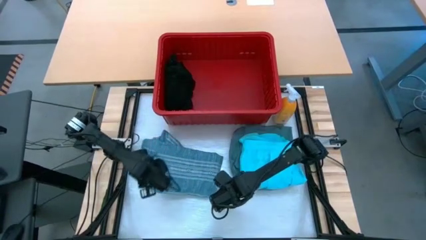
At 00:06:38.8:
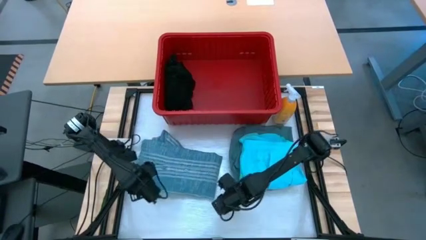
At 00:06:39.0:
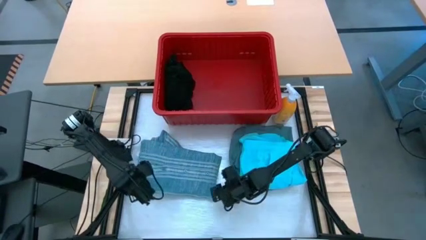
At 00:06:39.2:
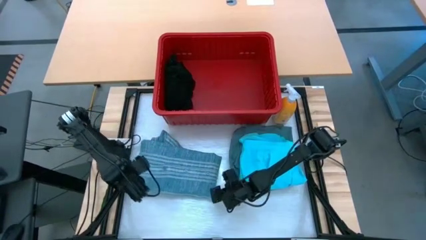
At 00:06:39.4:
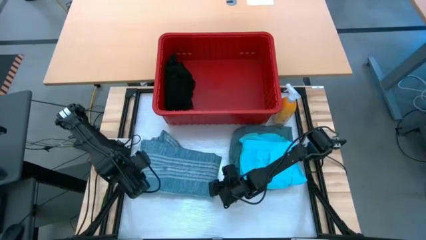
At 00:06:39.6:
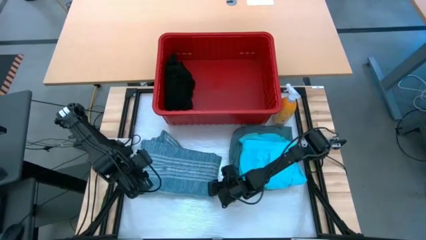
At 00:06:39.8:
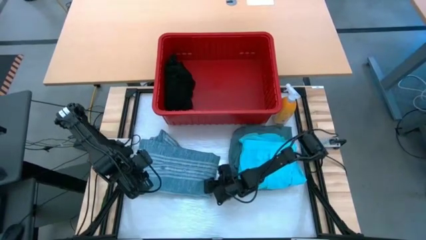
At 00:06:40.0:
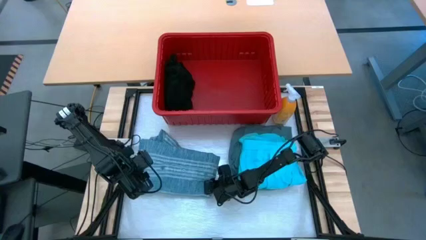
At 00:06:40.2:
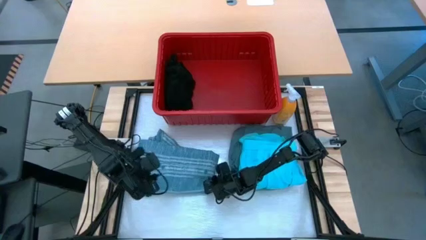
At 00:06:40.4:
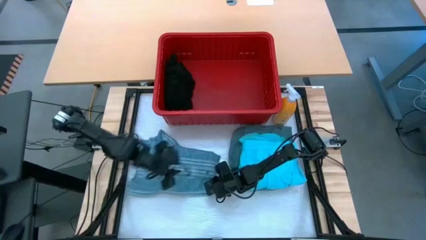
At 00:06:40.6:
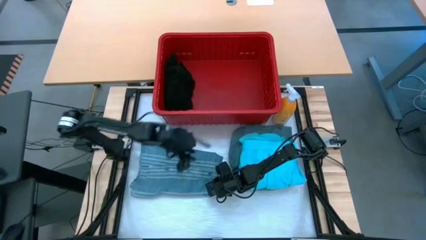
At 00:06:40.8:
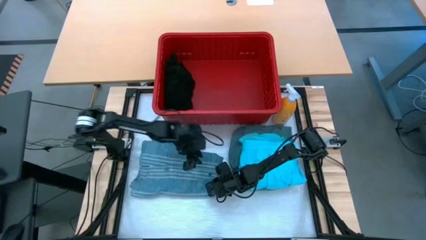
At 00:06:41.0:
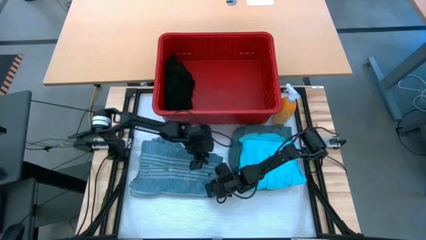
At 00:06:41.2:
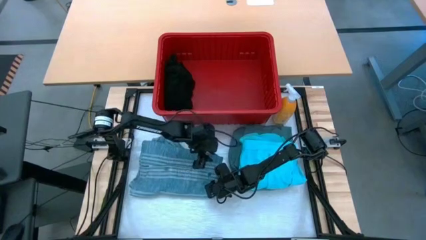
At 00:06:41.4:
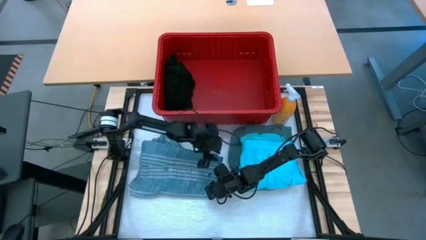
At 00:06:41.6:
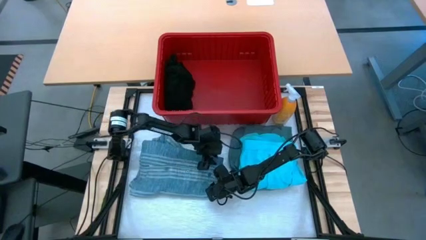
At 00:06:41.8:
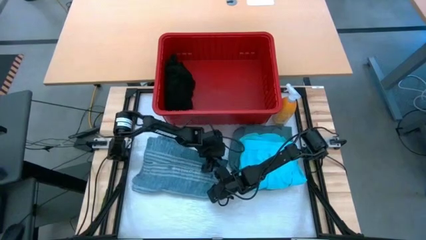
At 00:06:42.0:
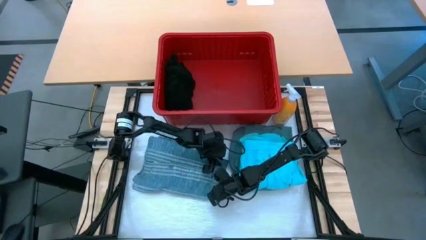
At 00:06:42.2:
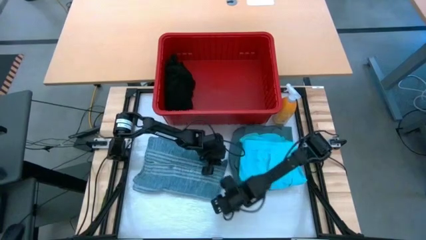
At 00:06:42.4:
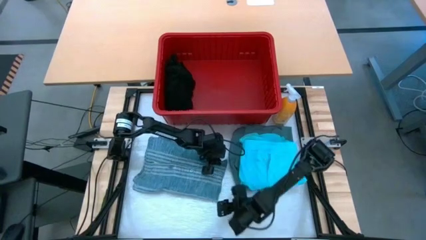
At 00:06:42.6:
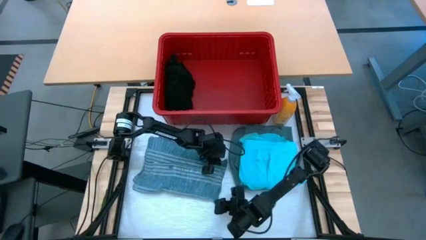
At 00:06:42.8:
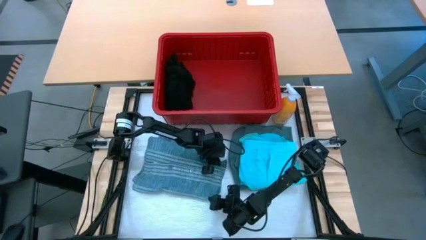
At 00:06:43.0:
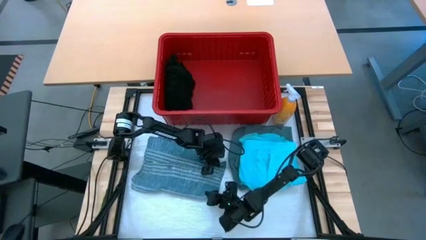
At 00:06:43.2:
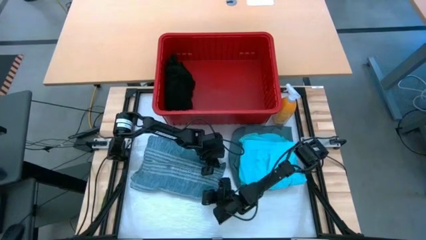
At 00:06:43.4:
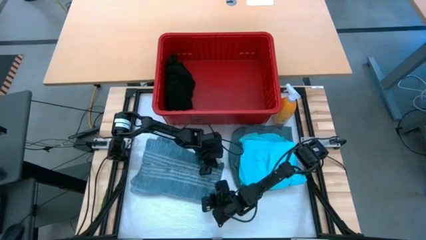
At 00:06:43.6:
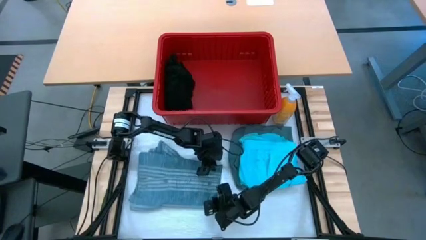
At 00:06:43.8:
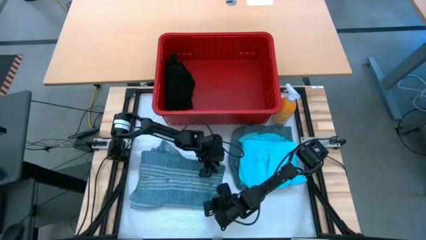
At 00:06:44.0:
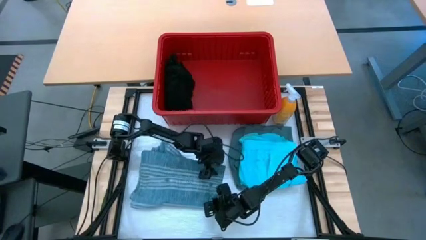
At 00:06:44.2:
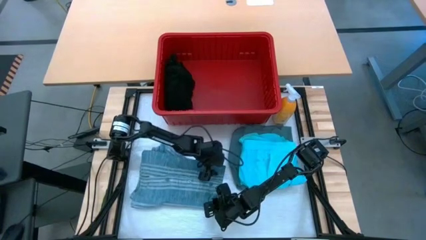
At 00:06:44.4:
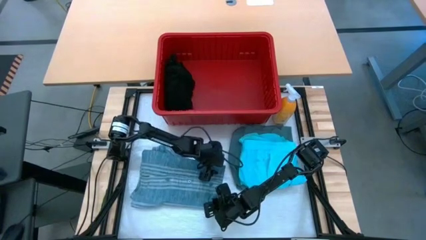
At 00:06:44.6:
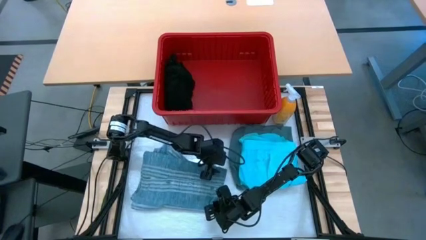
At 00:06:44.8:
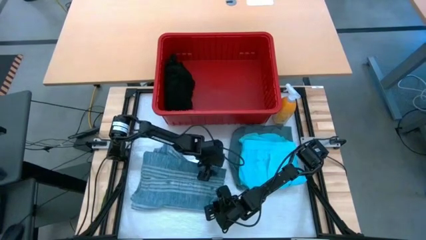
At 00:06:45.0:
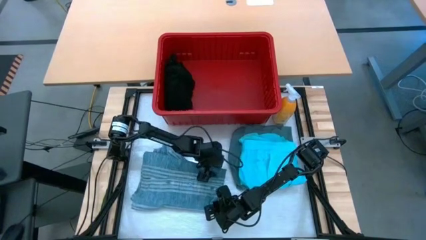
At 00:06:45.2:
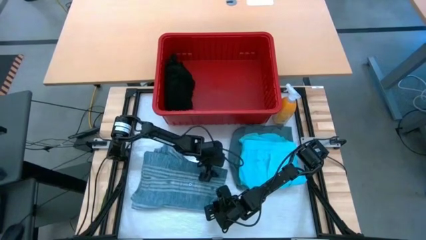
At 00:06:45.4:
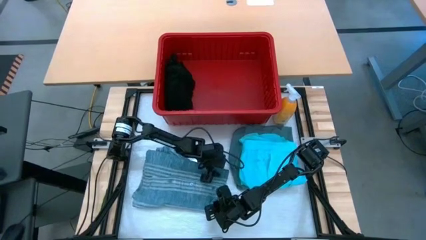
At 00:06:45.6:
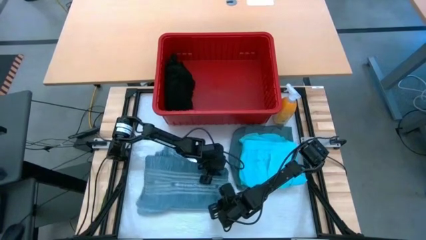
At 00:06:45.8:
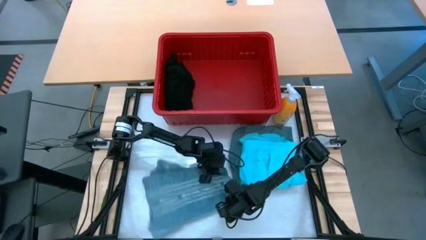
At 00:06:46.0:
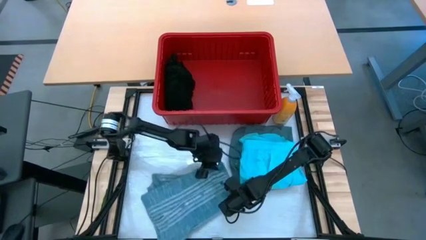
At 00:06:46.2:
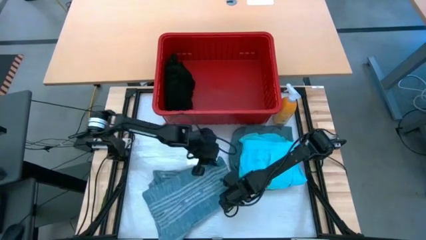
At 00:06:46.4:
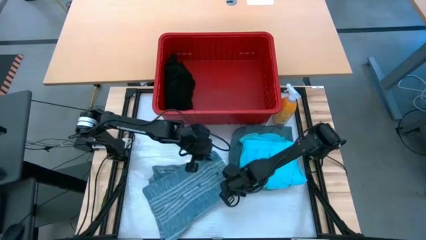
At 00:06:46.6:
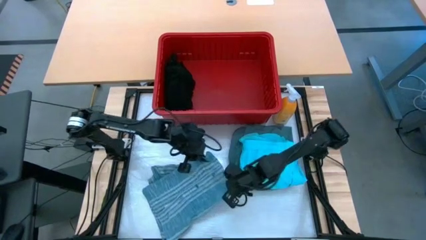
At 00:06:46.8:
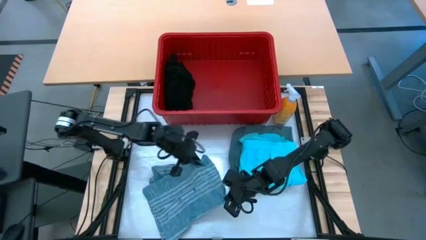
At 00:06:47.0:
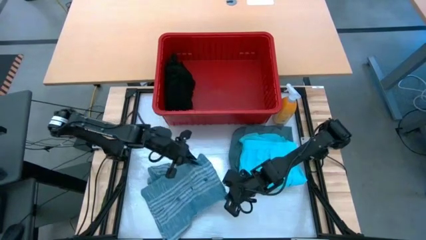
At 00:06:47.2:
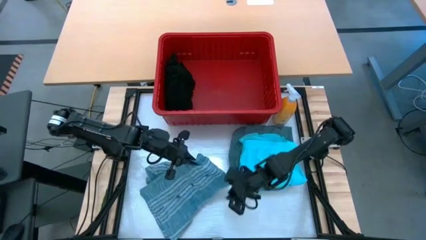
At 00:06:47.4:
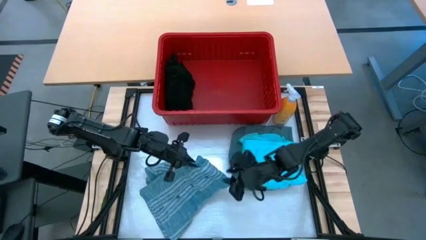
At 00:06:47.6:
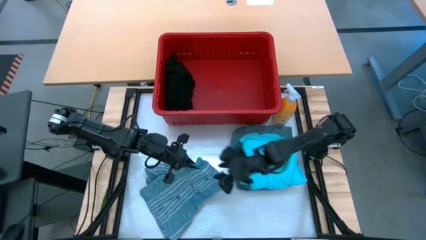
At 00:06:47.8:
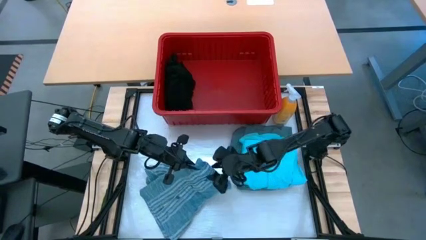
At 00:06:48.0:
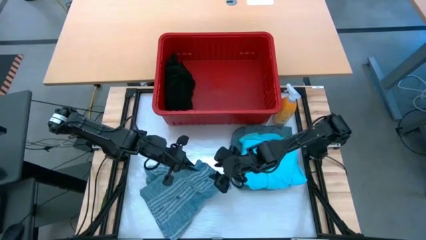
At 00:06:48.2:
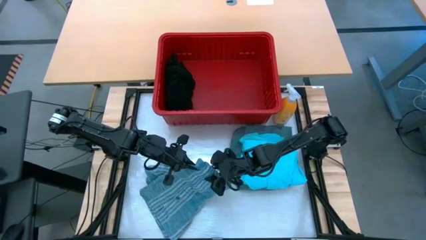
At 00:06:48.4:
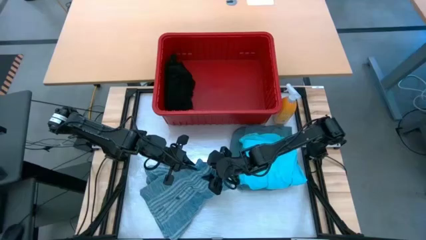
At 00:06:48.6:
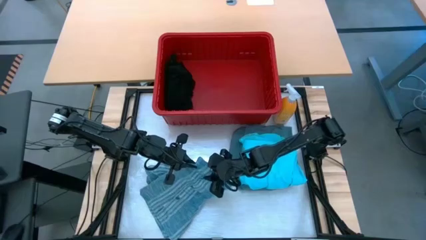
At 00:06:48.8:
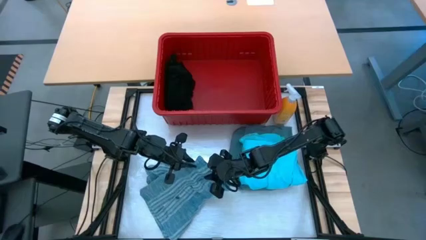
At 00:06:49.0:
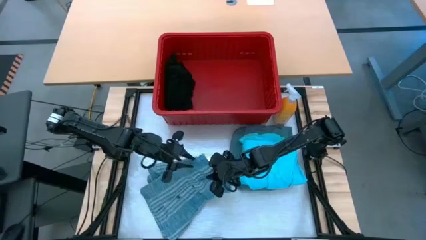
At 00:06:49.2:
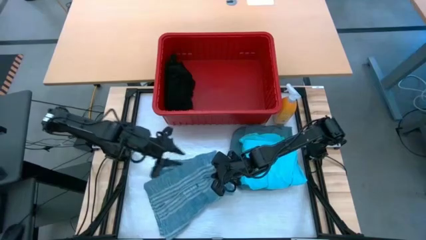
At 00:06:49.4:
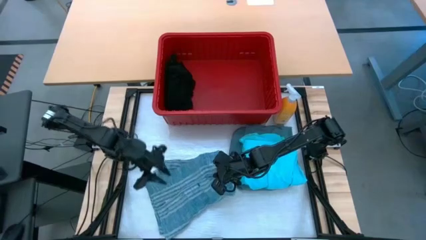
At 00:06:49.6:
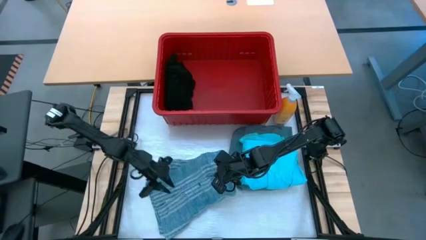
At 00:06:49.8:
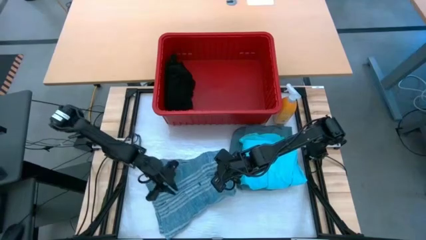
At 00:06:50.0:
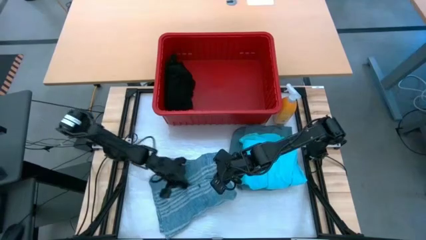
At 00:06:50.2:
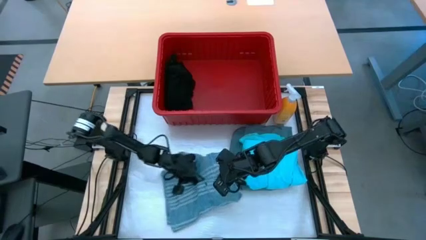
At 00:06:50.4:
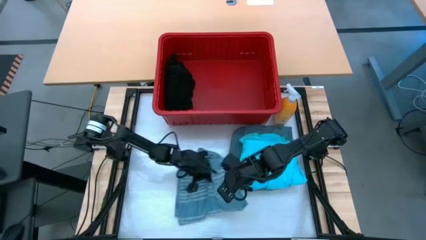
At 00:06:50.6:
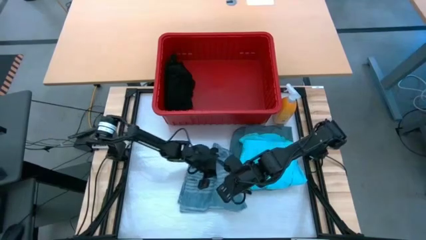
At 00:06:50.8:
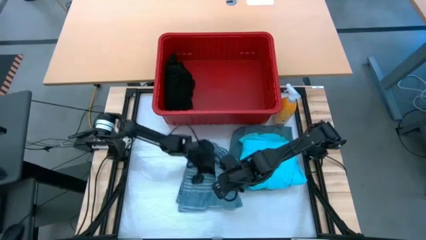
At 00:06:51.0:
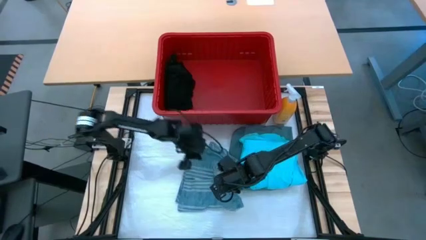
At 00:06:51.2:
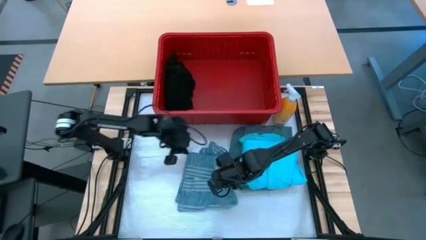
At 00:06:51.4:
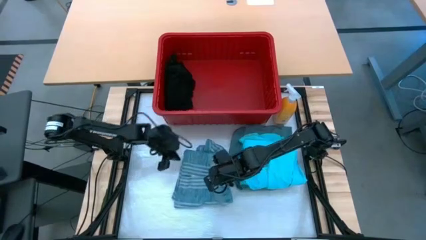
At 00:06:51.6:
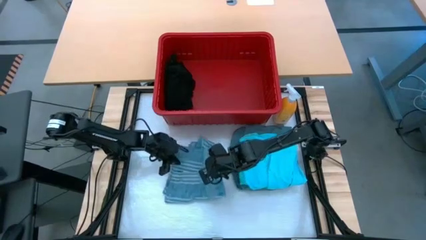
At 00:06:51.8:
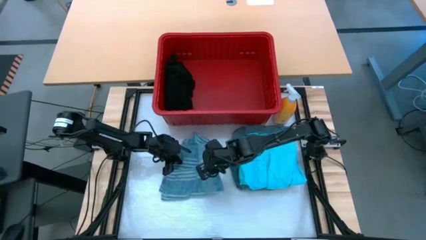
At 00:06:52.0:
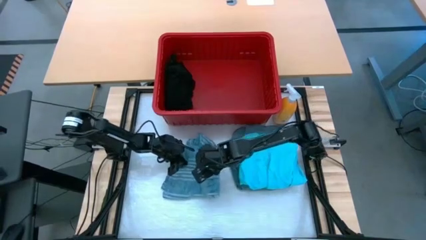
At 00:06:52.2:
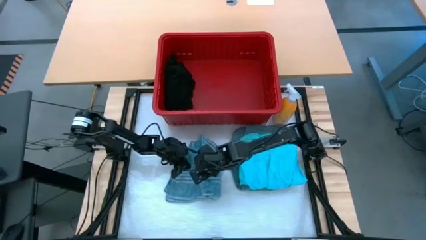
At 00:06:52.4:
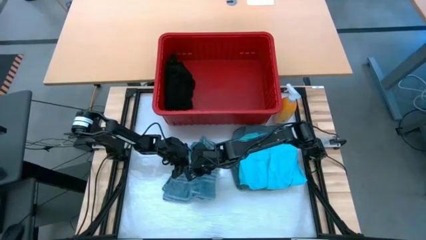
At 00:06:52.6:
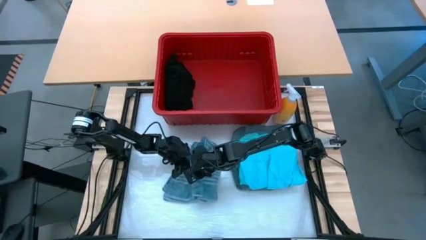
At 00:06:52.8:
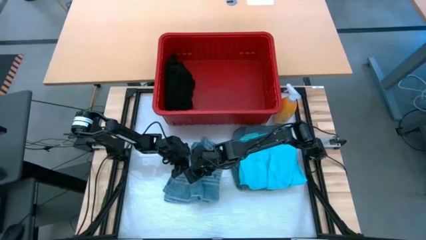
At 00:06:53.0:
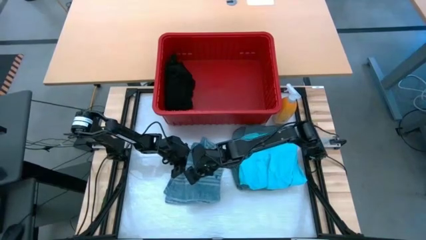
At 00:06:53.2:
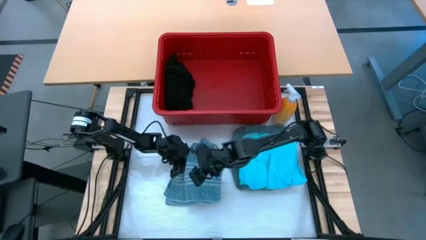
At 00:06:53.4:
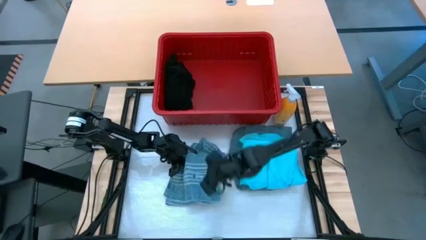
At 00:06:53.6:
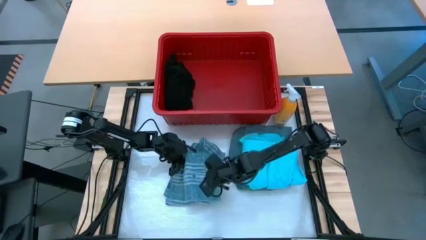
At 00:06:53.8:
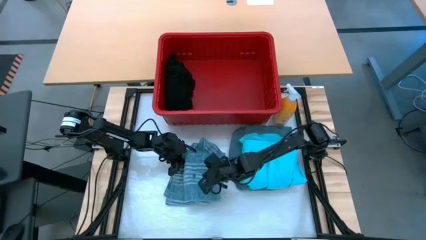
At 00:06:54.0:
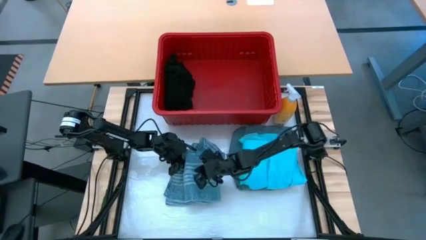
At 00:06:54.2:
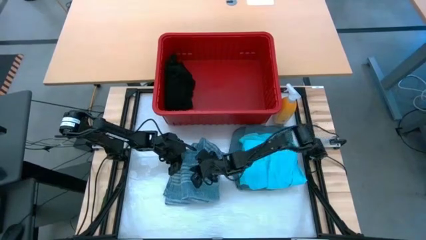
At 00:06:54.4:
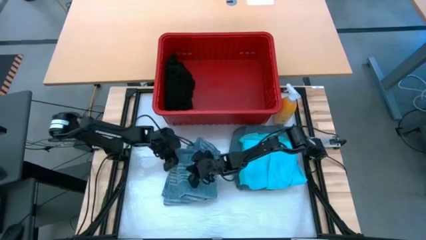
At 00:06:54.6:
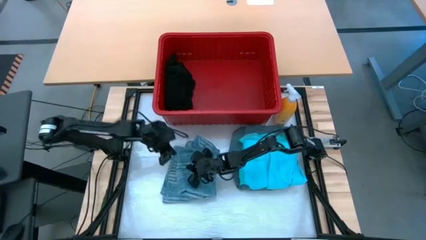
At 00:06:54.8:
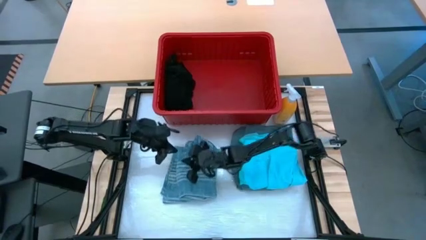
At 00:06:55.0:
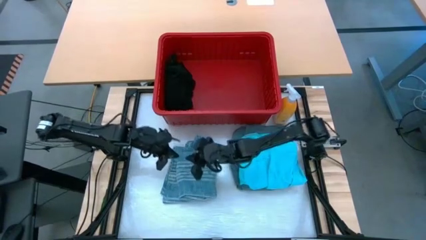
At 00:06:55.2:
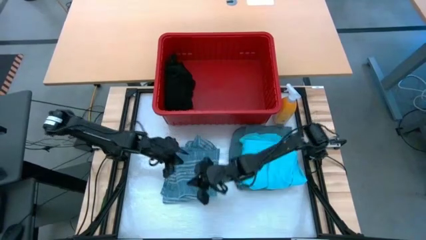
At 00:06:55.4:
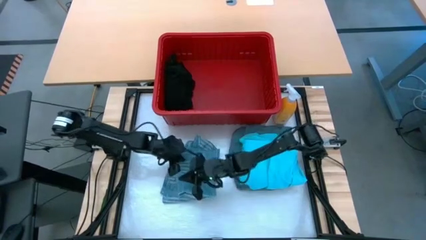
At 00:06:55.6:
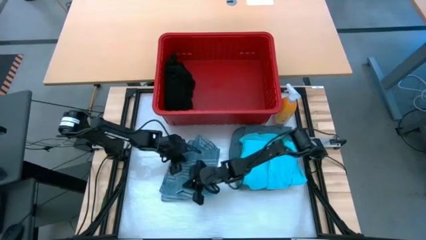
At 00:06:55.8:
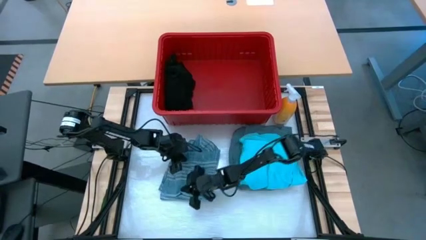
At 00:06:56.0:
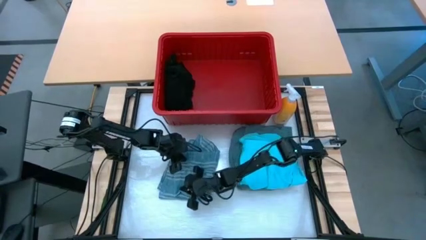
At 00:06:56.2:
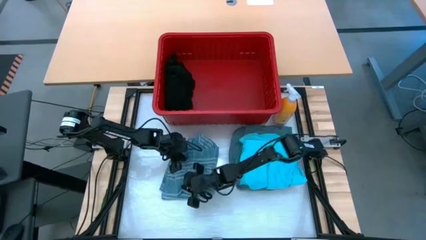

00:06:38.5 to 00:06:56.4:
Task: Fold Laundry from Bin
Fold the blue shirt
